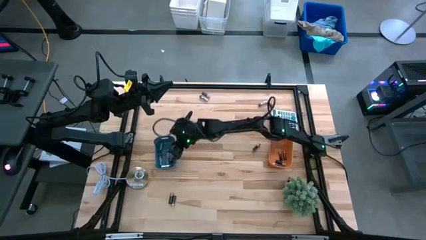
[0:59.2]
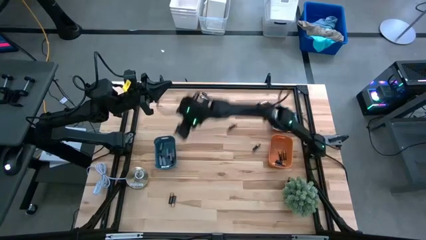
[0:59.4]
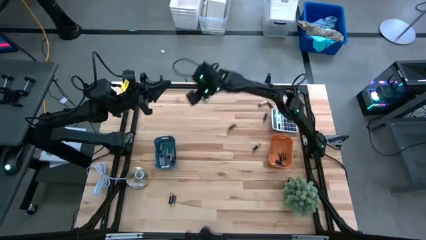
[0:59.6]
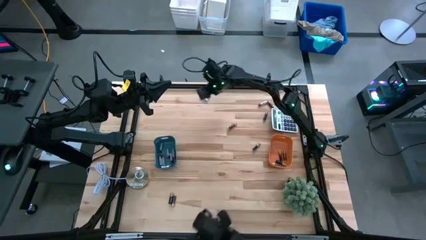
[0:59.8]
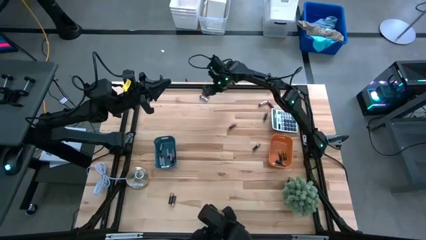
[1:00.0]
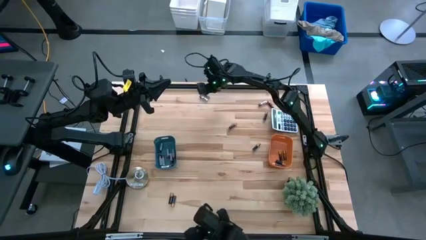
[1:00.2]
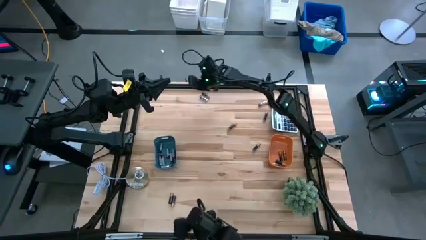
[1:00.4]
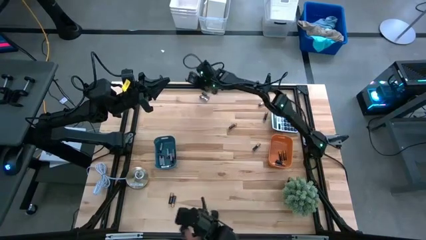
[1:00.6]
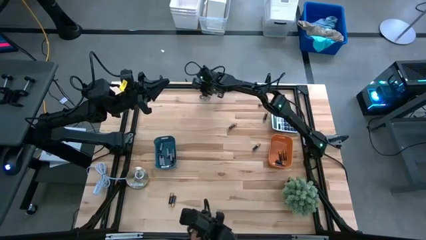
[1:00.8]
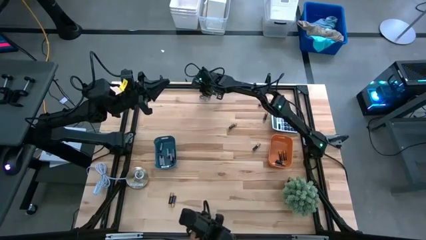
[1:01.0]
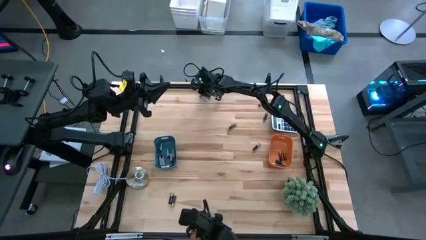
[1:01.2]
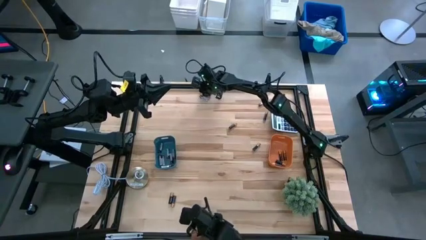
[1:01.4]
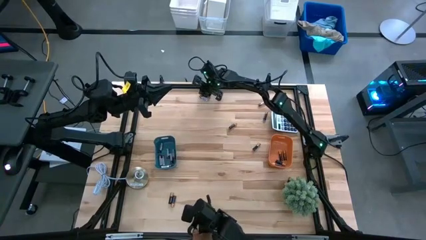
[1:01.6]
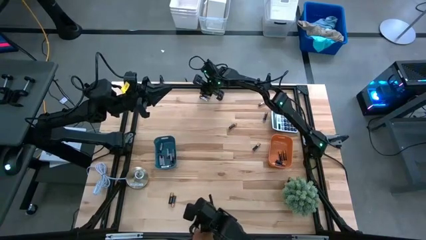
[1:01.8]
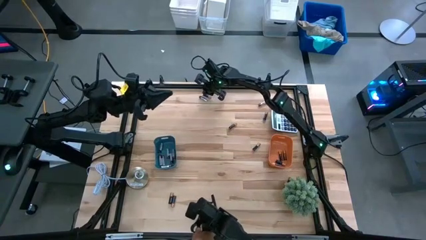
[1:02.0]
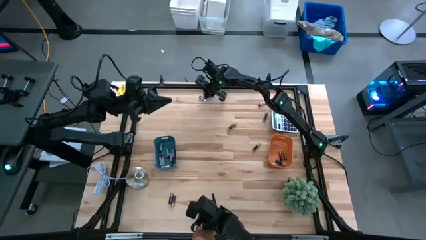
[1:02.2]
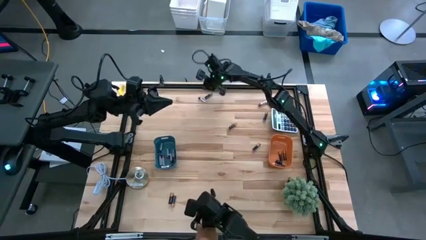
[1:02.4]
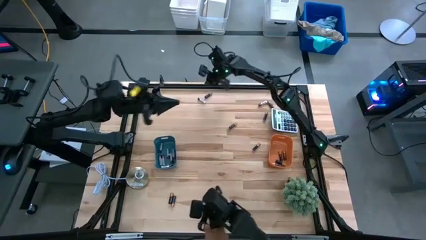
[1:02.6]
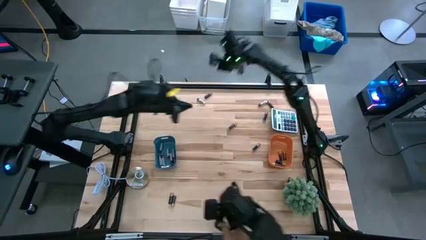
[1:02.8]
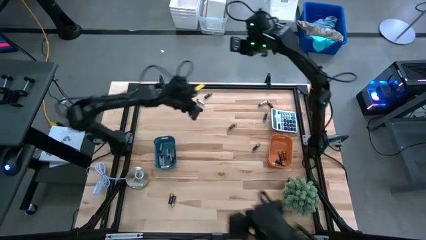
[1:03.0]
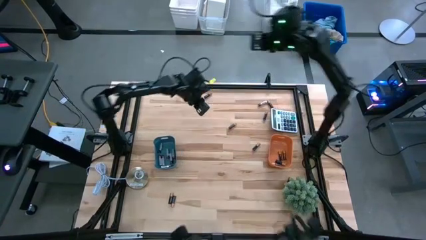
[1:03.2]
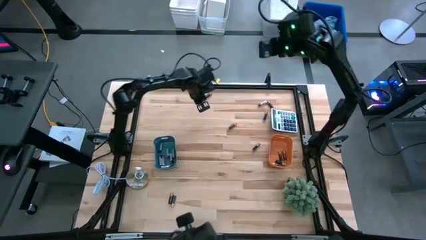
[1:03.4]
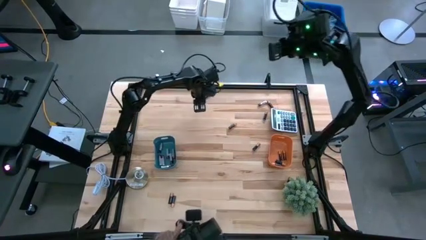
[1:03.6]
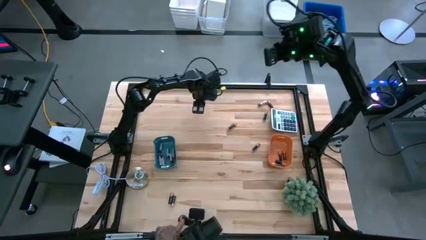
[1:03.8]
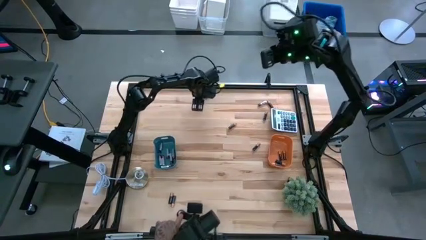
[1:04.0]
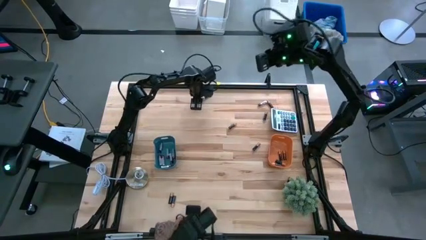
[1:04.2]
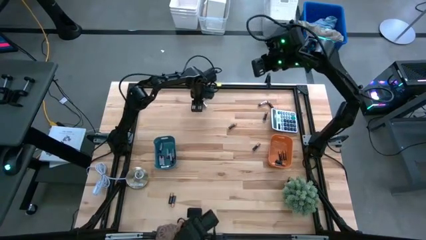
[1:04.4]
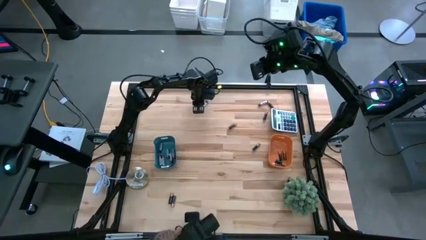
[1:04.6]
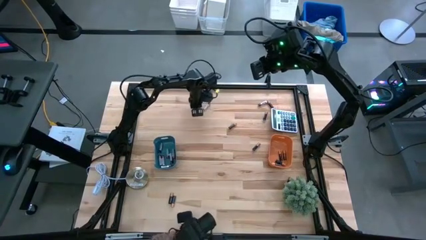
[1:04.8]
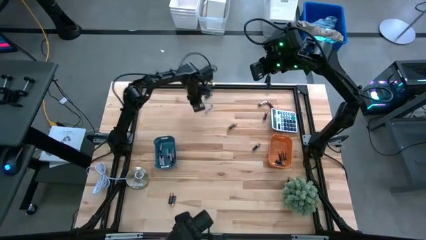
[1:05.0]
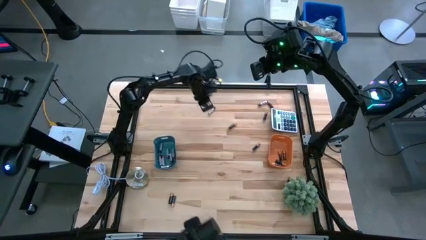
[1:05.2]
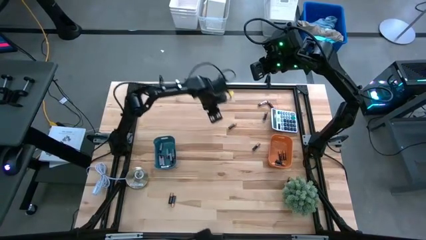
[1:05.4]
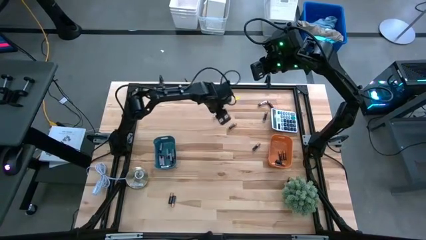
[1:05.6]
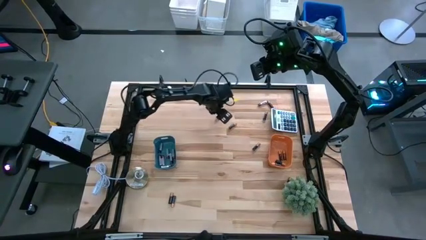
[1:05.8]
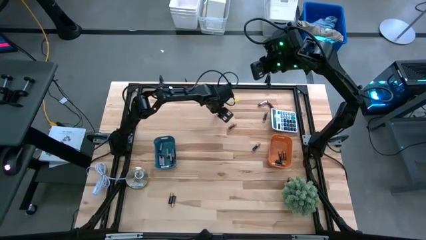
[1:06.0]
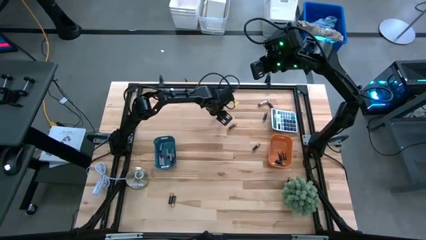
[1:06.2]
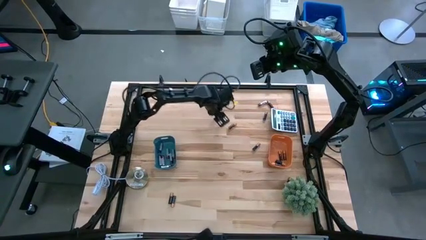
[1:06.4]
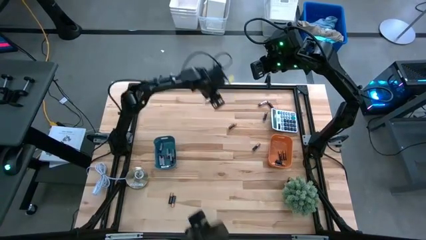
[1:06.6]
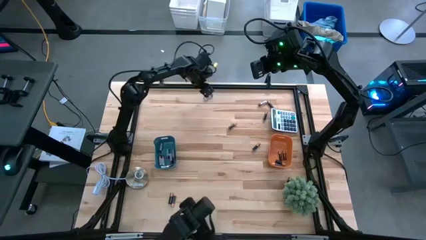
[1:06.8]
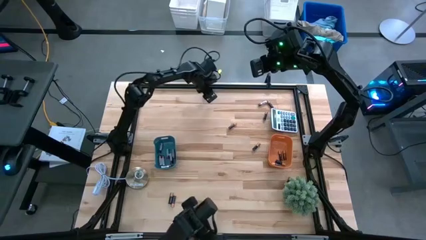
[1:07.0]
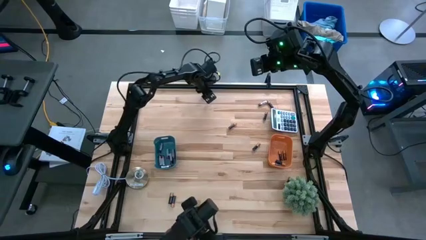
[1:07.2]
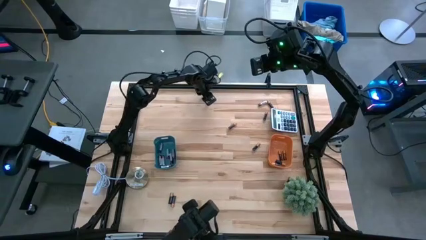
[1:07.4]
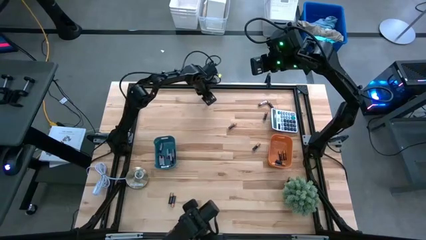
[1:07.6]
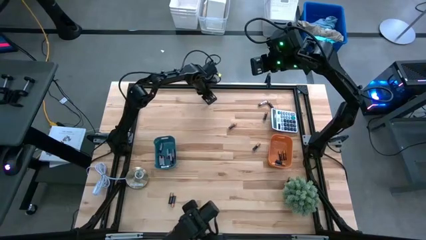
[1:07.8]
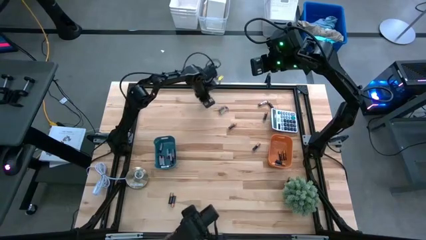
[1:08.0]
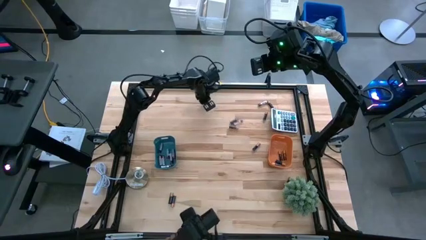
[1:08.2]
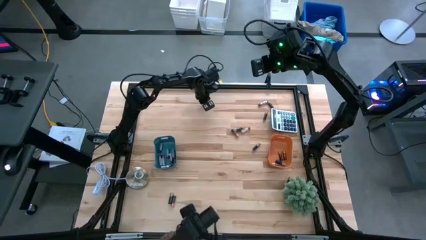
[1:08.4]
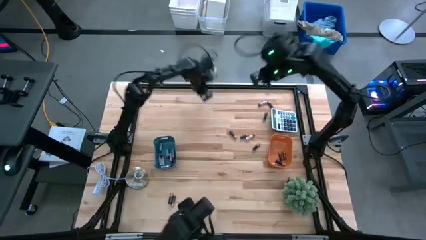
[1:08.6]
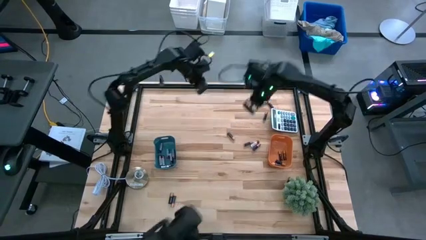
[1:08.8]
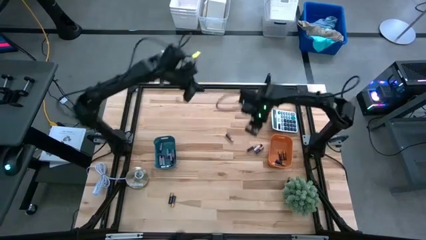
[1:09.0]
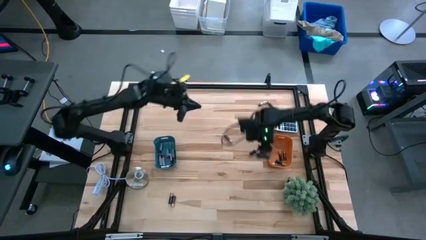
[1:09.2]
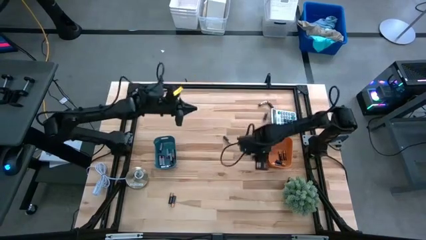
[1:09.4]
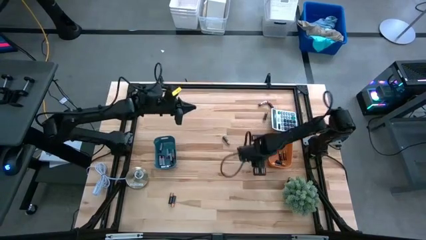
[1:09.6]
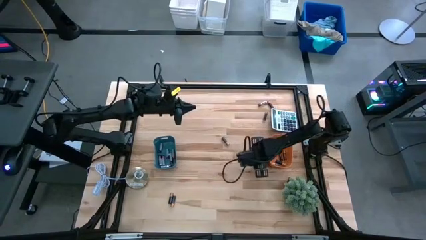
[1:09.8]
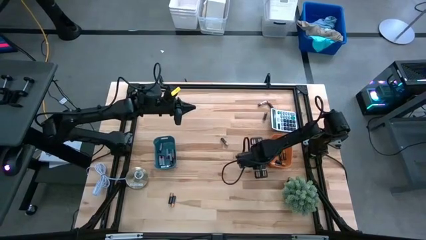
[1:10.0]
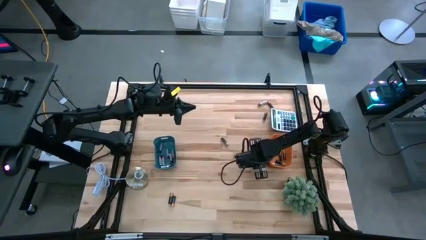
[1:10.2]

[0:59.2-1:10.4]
Task: Sort batteries
Put the silver battery into the blue bin

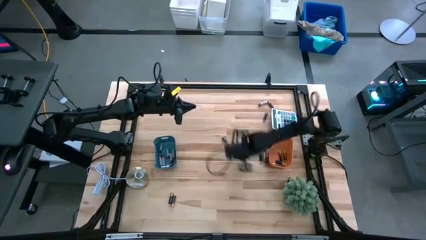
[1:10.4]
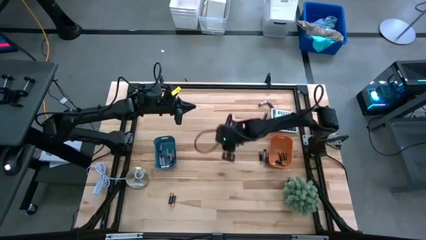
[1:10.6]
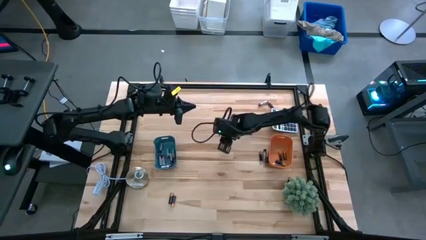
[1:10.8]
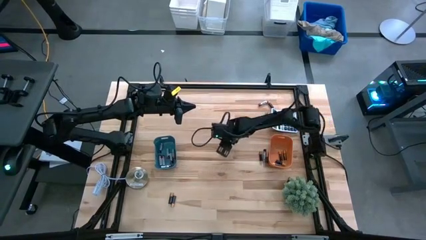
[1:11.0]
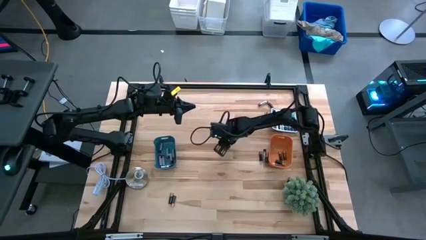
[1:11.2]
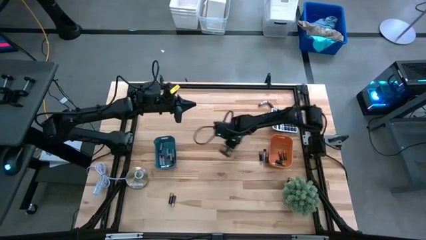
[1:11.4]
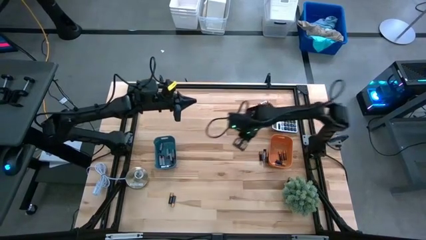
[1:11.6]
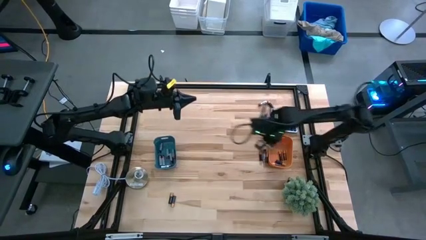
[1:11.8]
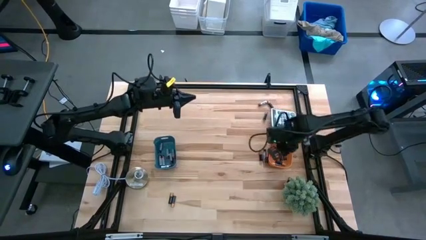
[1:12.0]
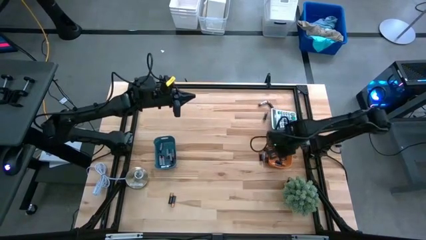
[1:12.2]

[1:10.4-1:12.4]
Put the black battery into the orange bin

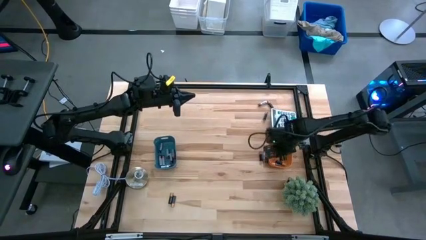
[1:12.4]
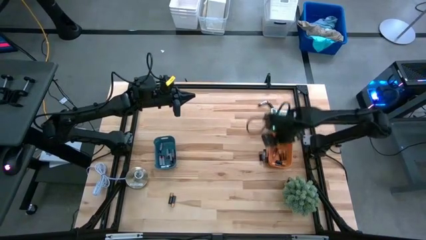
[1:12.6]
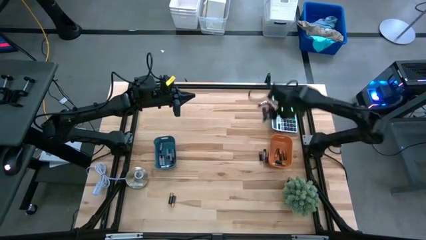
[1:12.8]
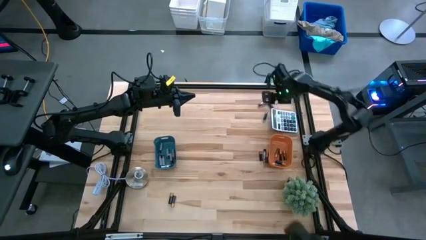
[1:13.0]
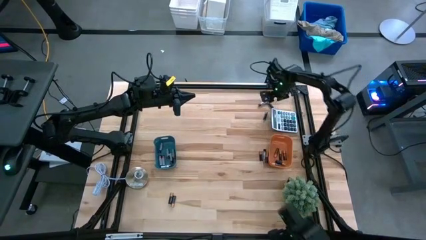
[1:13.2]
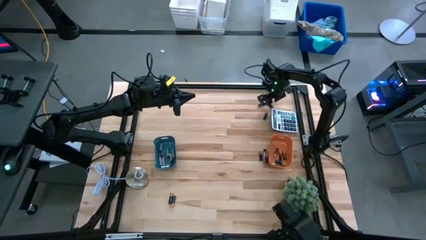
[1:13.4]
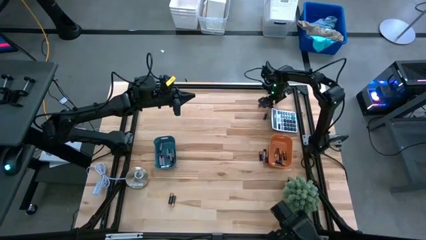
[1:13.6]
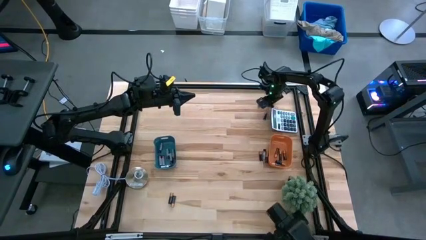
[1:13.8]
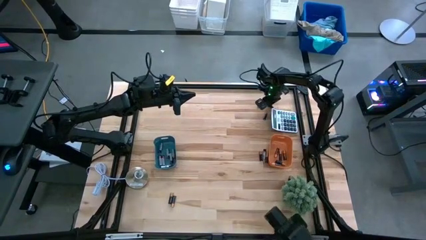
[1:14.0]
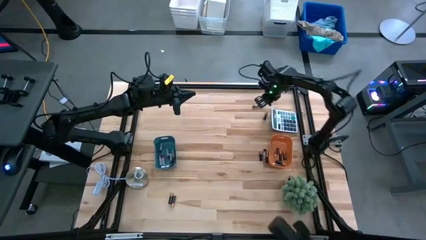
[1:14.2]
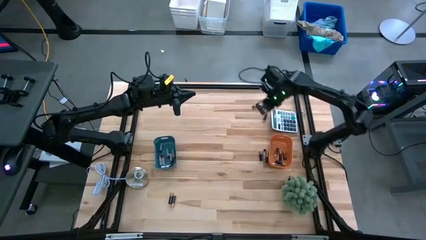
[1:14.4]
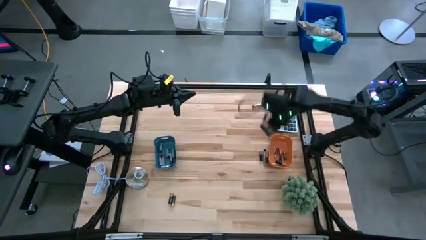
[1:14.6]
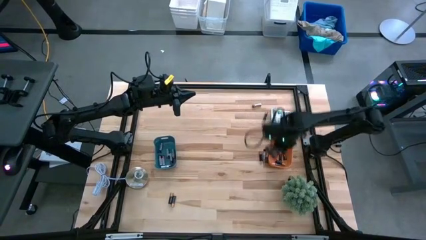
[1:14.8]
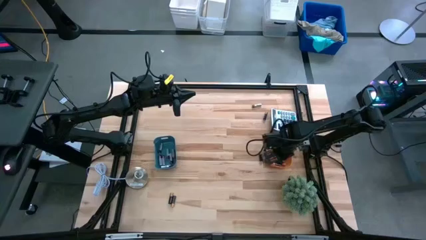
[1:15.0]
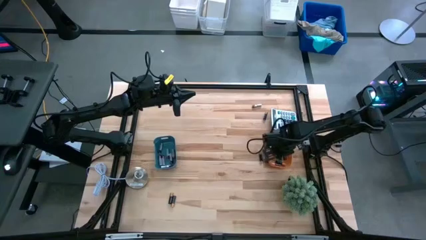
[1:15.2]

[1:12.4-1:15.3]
Put the black battery into the orange bin

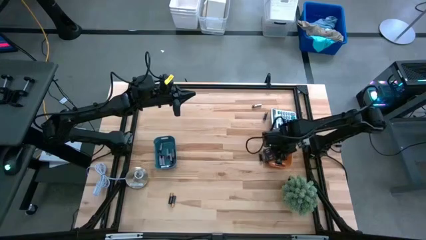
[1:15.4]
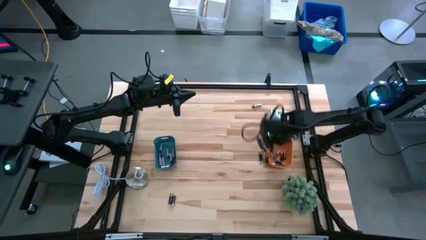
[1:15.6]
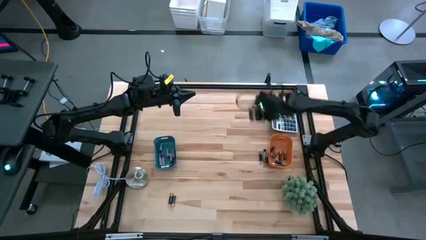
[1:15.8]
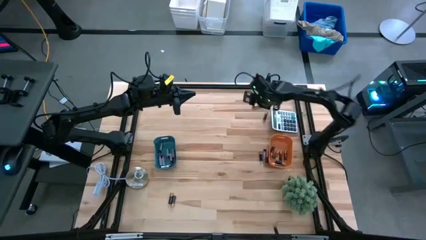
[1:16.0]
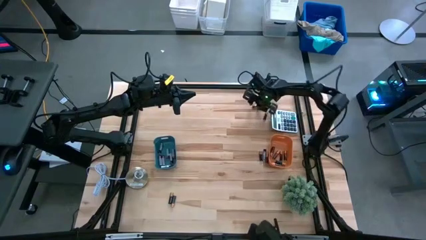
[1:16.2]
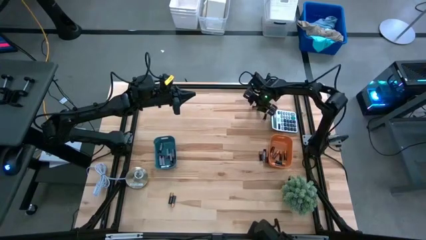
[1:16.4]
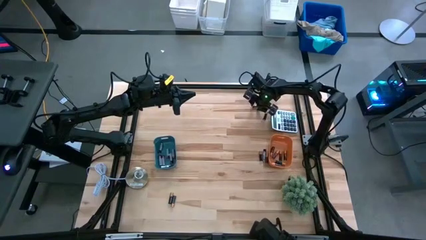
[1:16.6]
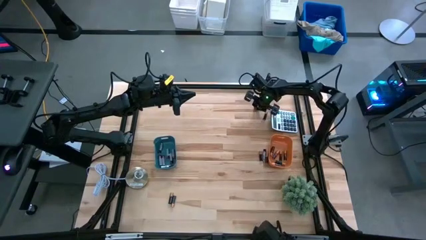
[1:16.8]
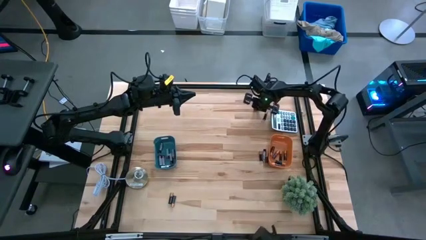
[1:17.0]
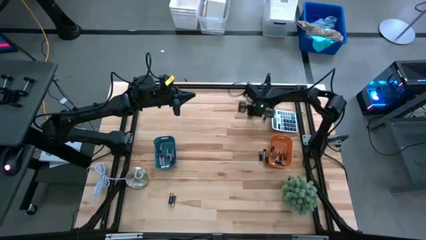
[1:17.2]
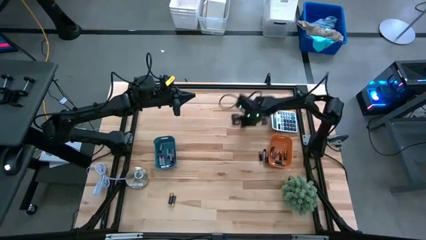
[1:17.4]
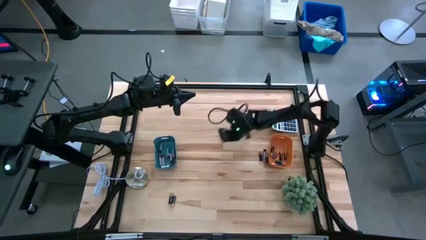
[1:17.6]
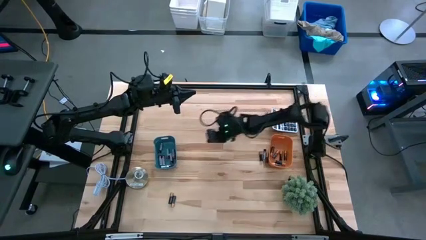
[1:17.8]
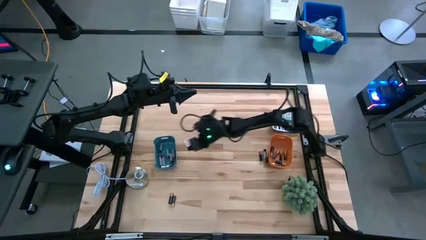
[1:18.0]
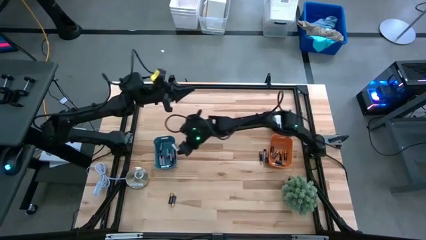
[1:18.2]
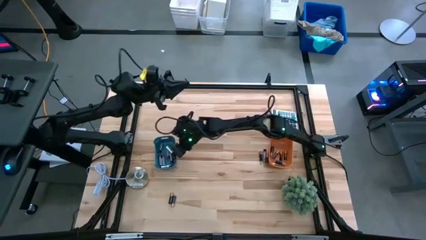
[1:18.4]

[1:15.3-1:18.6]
Put the silver battery into the blue bin
